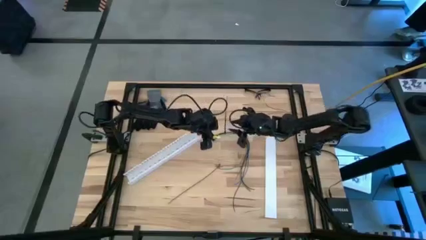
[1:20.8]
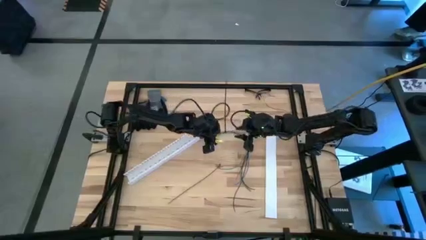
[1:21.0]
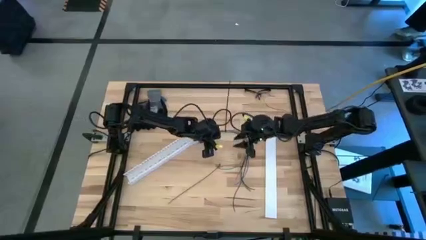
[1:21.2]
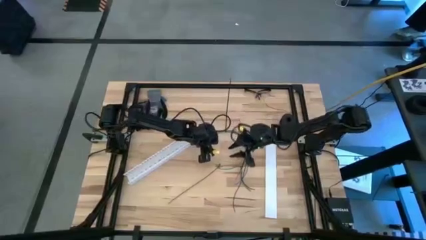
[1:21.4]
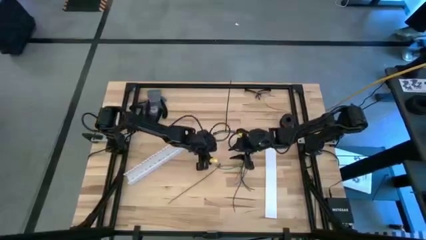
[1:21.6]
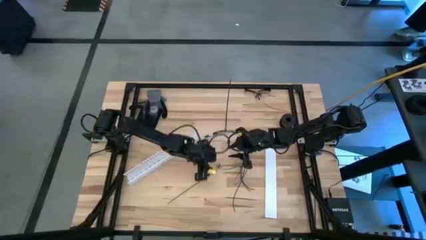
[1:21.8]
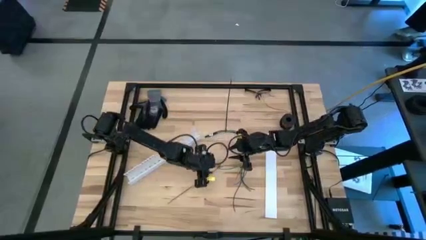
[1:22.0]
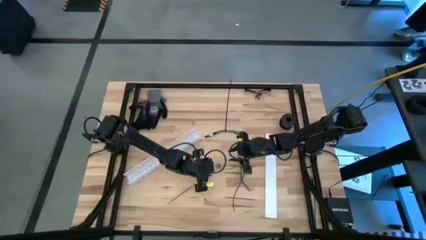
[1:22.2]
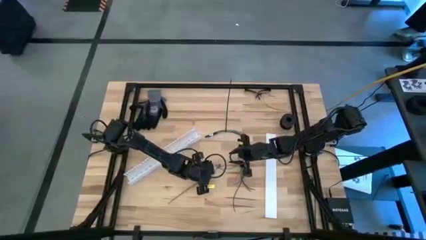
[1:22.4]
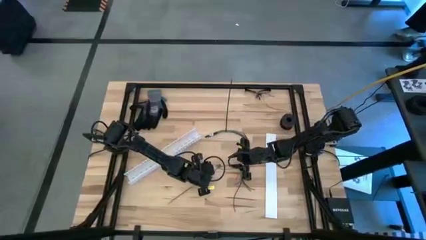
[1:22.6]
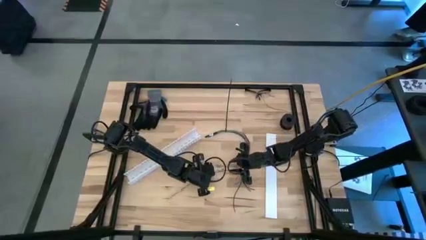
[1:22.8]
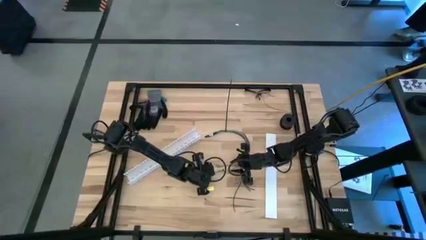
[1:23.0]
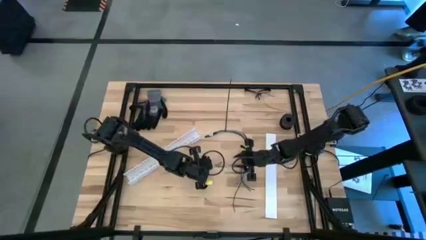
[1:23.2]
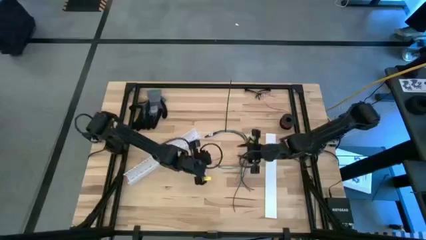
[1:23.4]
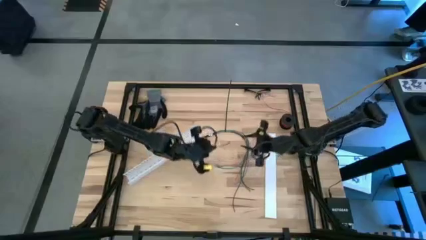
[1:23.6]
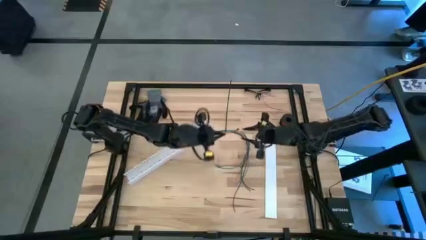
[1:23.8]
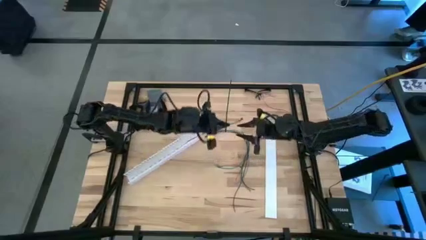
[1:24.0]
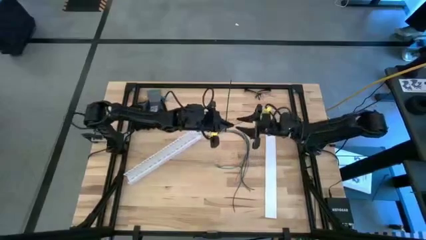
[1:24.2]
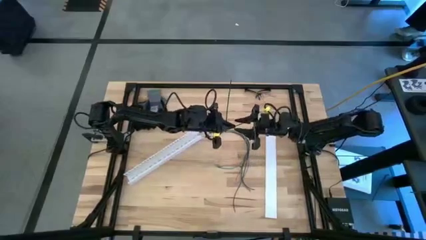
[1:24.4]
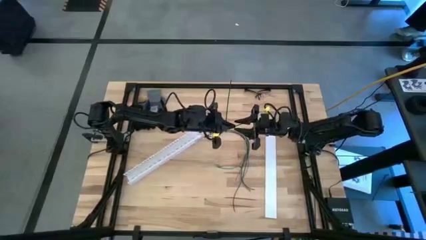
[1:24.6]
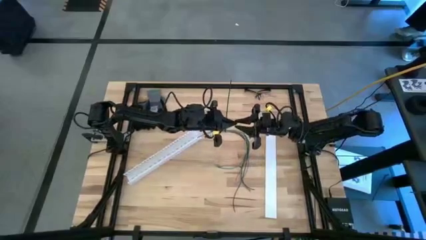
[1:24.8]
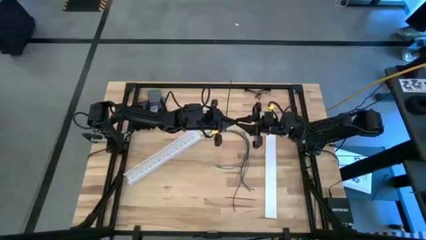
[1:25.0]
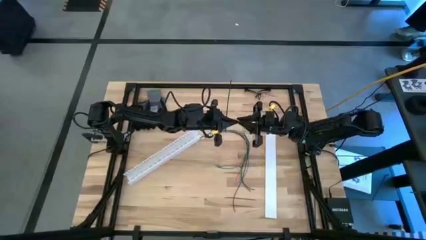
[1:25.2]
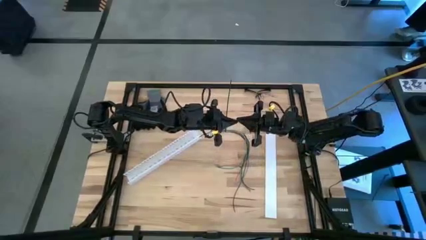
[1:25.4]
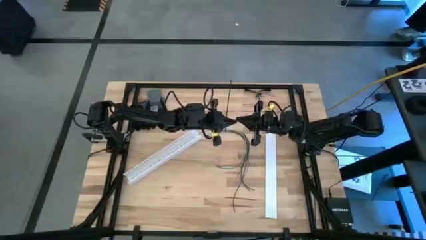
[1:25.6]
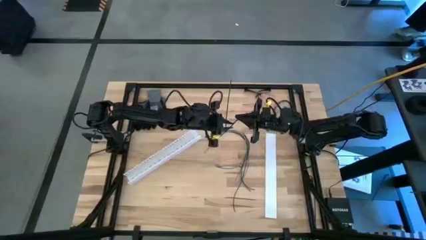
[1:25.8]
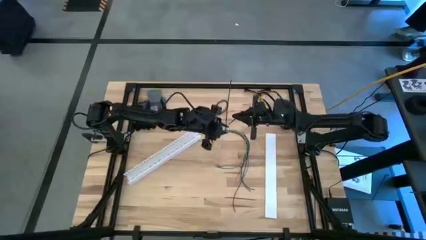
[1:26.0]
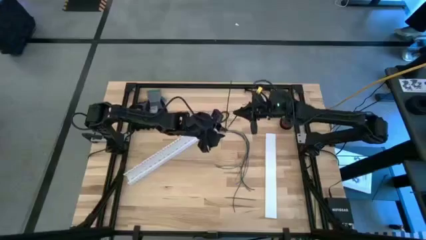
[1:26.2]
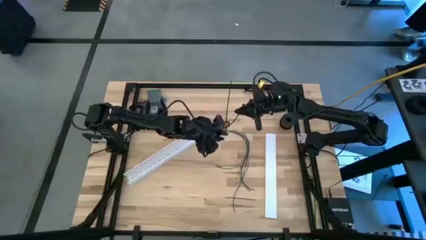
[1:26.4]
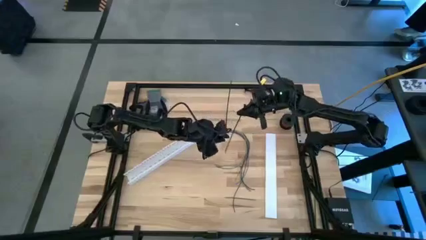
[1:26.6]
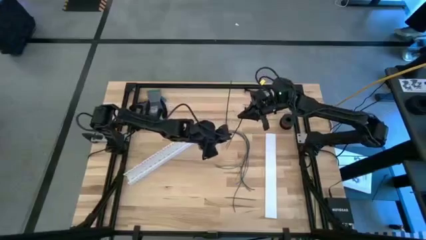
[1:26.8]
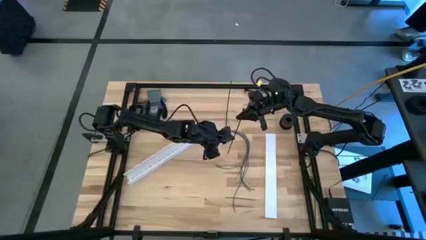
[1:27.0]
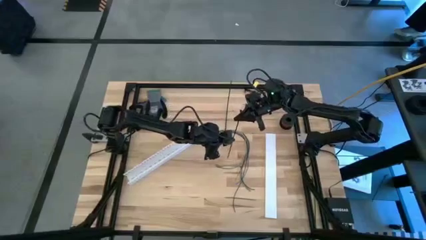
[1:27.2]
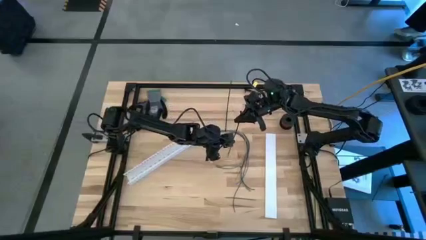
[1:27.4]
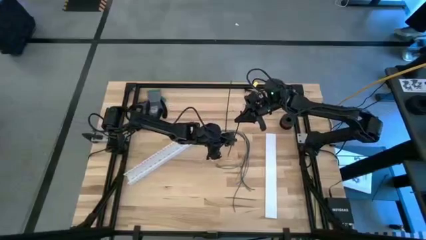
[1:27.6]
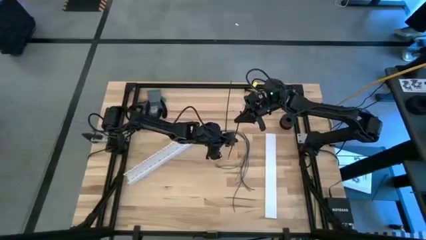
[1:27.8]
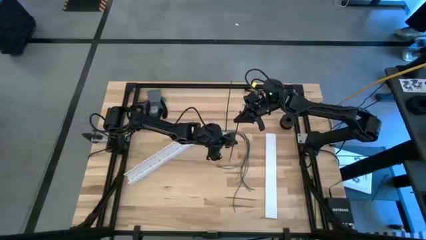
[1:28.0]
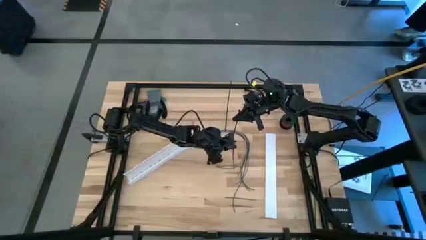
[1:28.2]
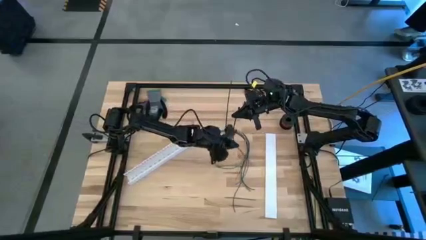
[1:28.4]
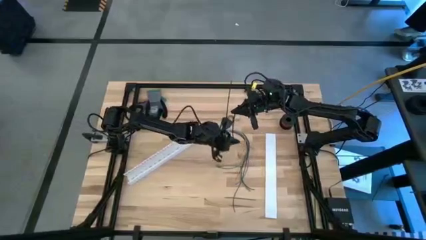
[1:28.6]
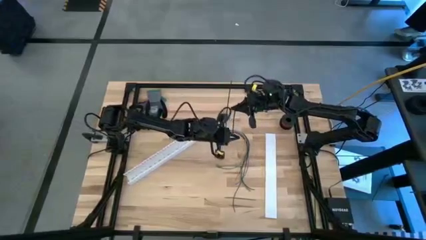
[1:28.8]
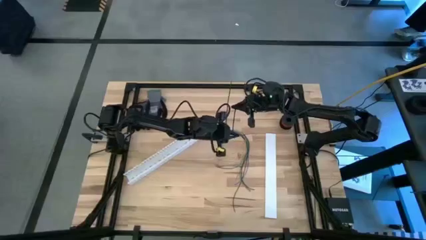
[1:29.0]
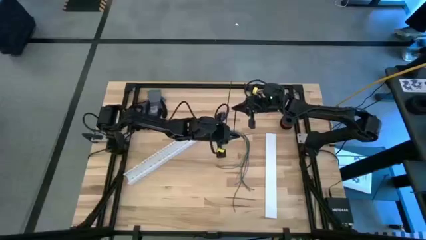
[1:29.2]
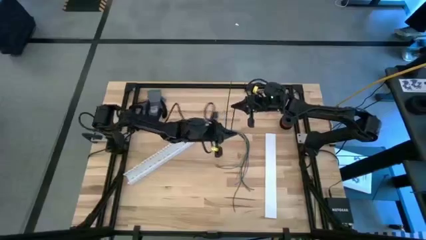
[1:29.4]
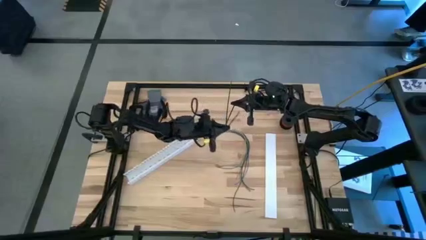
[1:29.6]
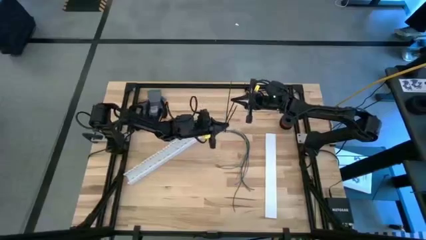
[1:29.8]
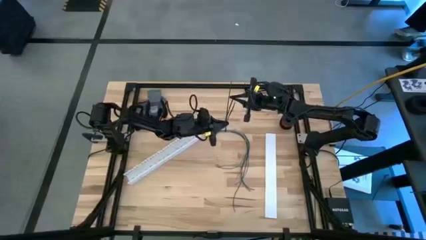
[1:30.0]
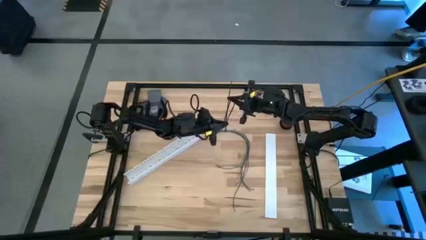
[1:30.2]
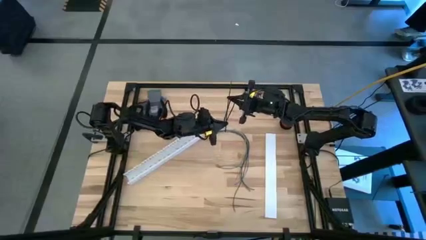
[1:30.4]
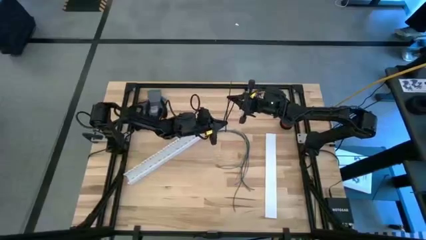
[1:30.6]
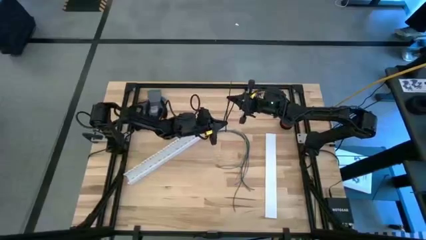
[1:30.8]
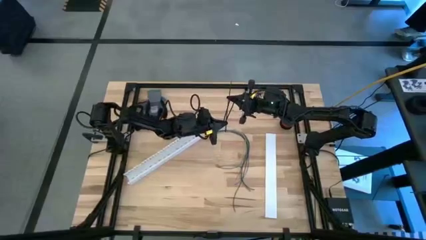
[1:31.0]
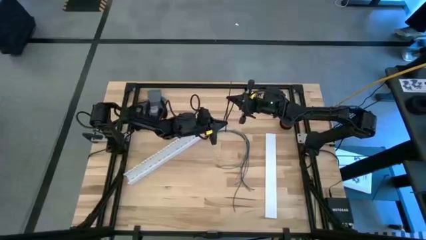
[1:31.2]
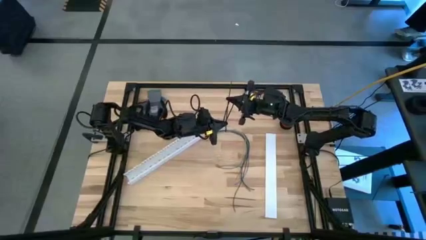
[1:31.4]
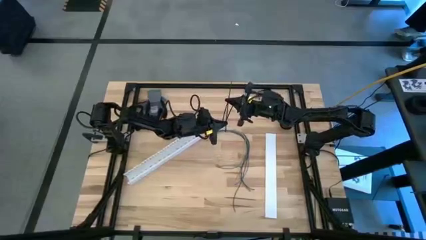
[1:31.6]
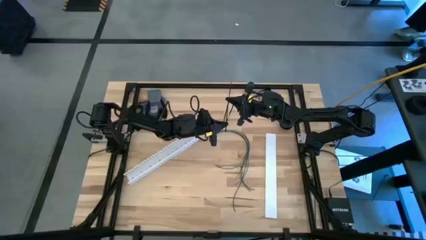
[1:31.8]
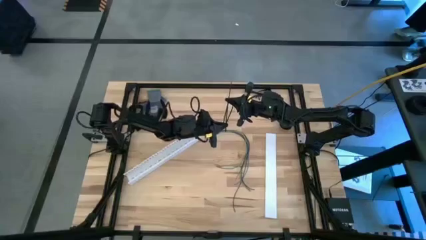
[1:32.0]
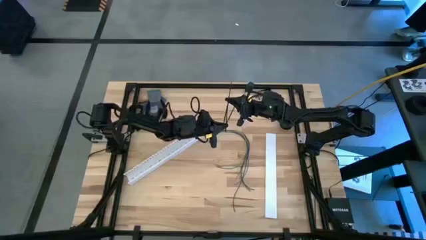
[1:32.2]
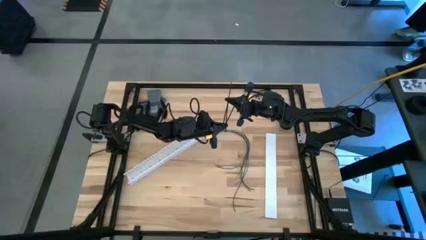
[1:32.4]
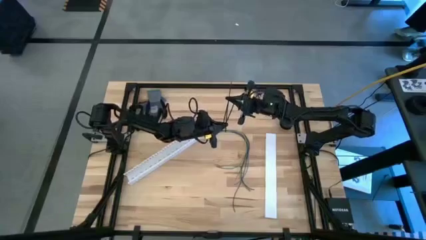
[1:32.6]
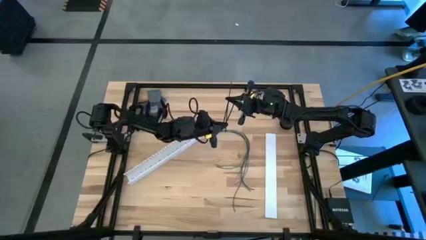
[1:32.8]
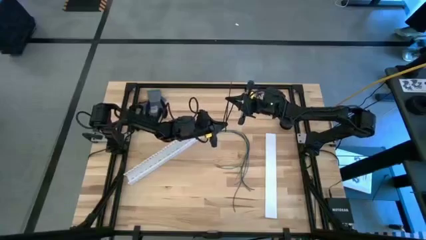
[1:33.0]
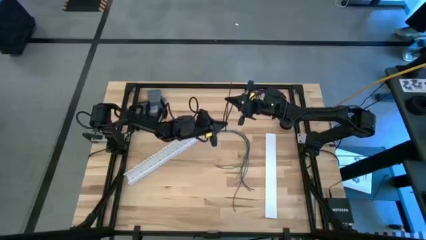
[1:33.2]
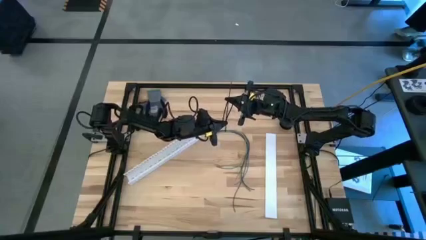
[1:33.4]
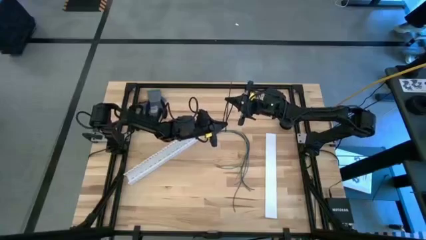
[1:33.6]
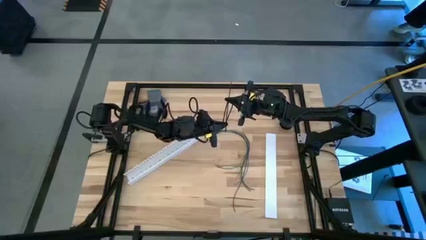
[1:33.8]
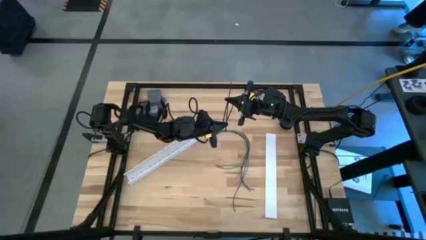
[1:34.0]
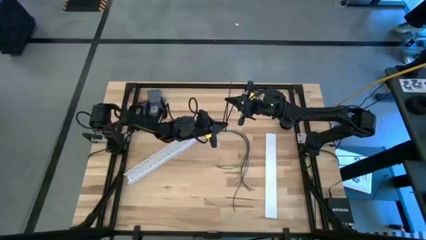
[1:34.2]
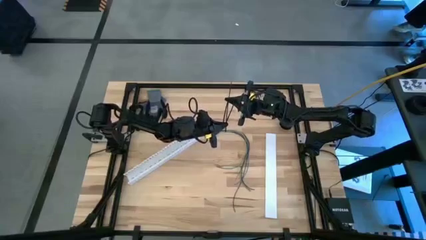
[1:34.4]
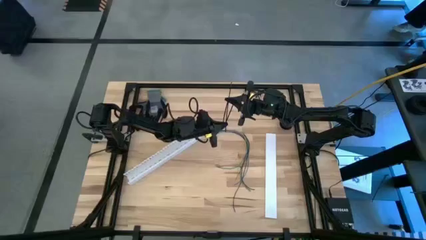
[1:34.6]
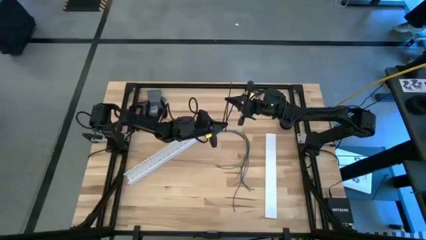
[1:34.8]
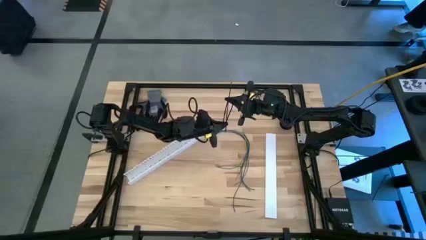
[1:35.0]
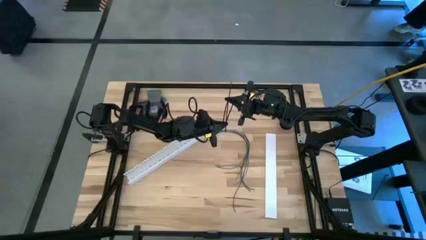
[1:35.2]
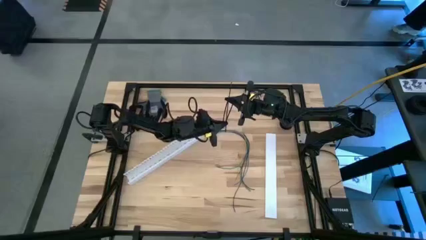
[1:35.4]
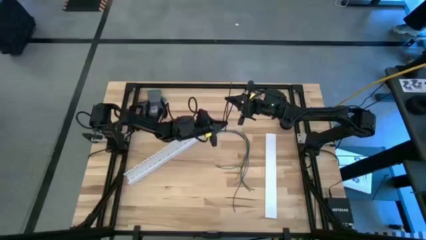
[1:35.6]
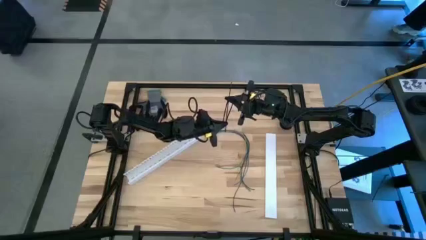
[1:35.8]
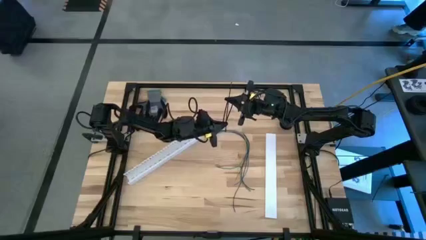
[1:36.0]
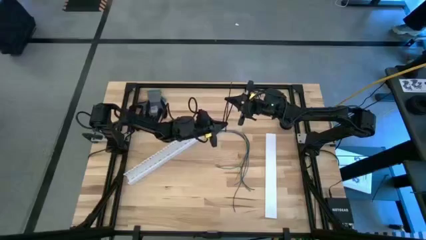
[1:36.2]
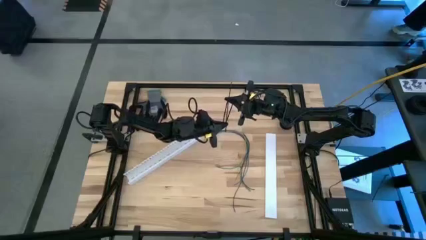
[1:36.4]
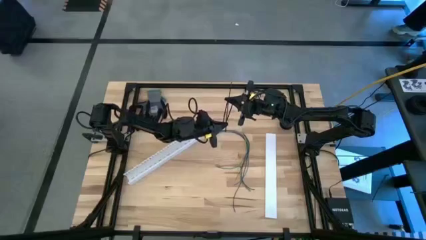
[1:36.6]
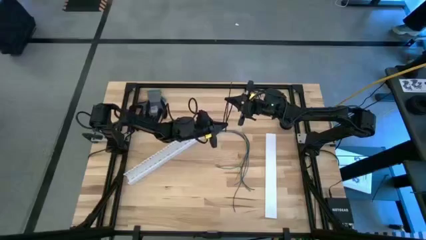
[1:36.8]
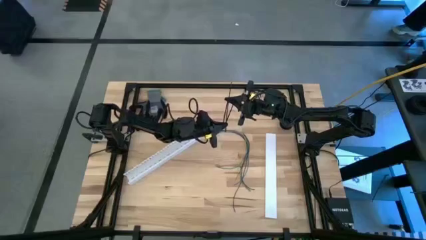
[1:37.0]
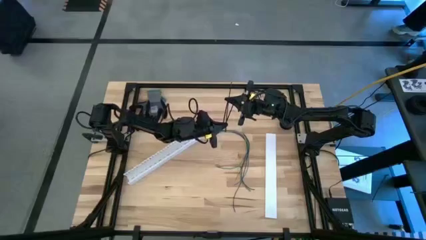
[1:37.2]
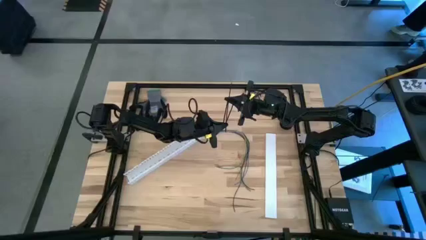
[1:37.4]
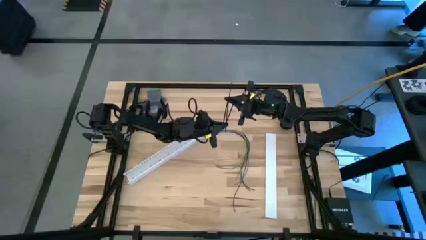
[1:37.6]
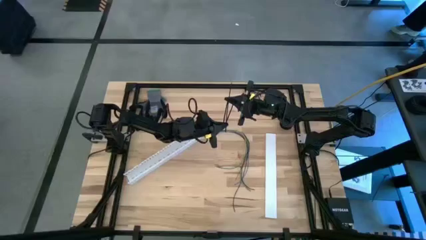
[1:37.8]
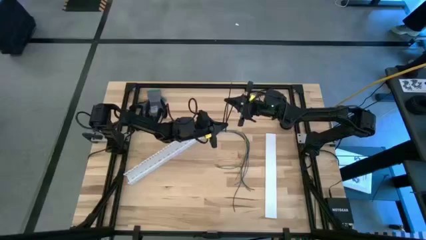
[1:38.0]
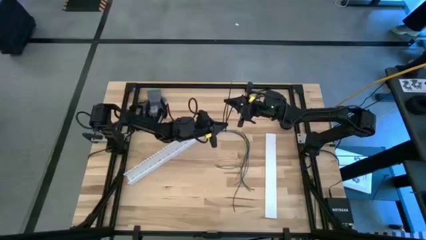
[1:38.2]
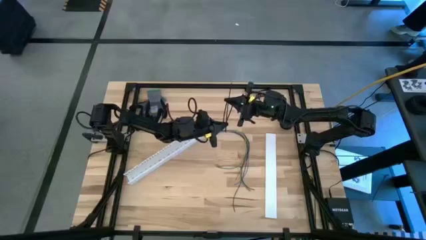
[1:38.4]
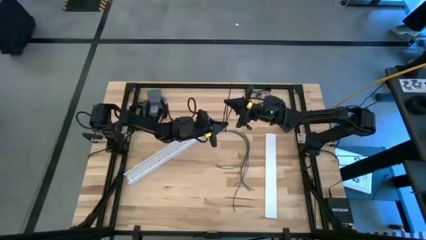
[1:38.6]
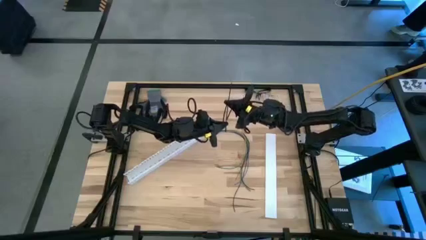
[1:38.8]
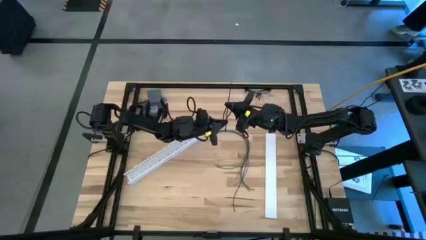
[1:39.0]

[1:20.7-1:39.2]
Task: Ziptie cables
Wrap the black zip tie on the colored cables
